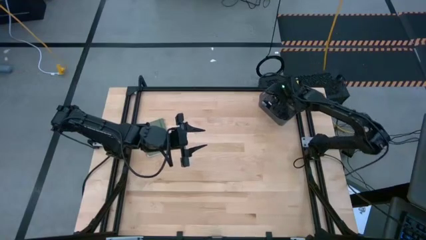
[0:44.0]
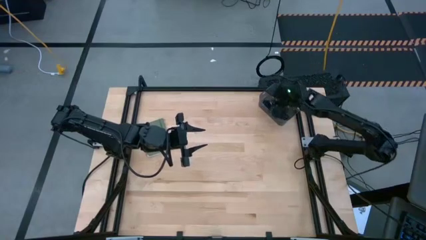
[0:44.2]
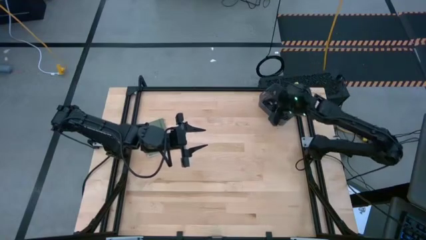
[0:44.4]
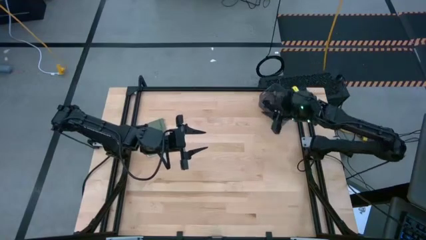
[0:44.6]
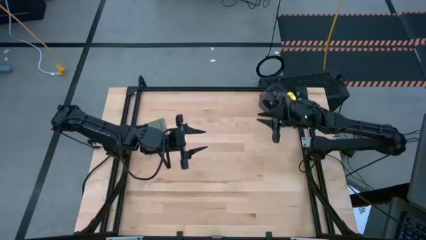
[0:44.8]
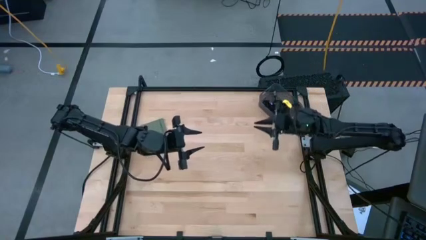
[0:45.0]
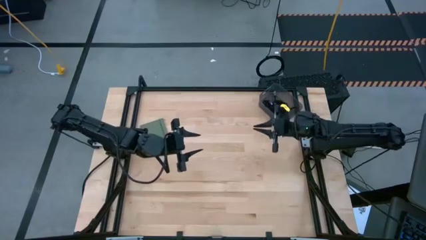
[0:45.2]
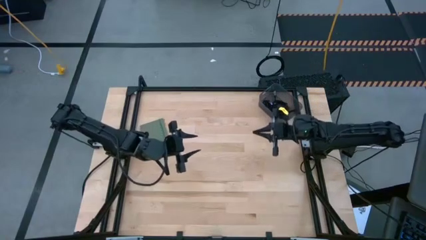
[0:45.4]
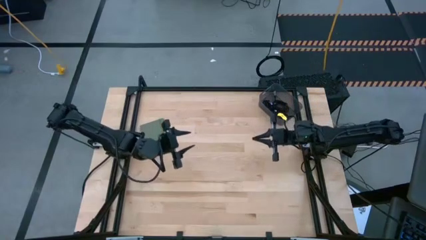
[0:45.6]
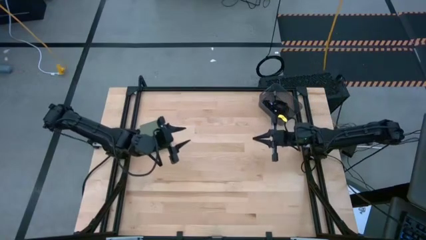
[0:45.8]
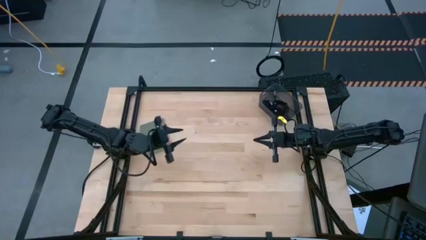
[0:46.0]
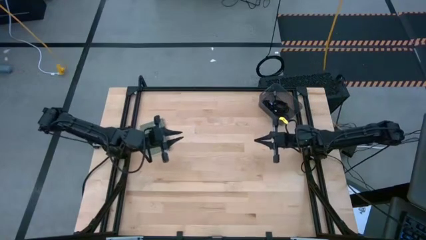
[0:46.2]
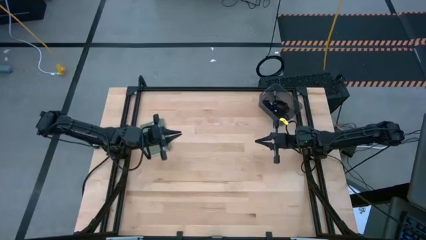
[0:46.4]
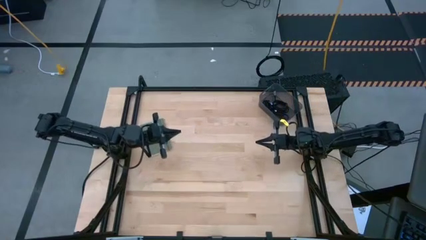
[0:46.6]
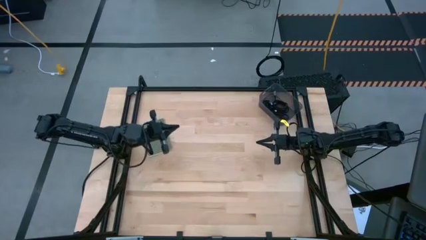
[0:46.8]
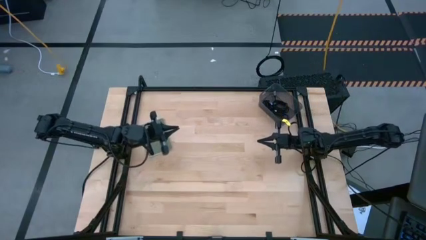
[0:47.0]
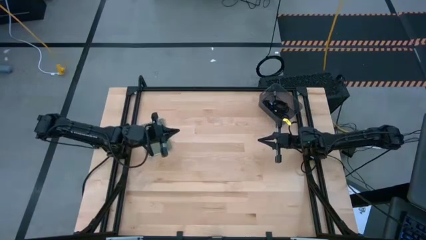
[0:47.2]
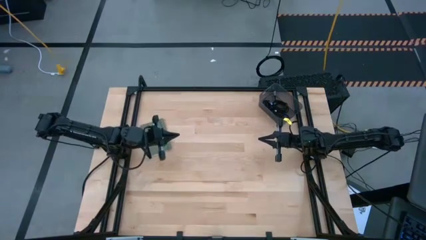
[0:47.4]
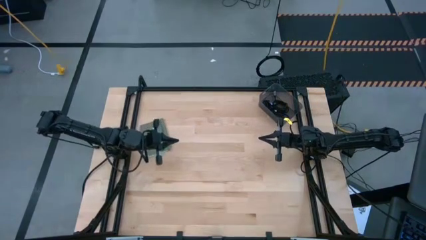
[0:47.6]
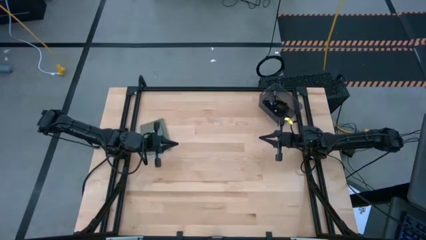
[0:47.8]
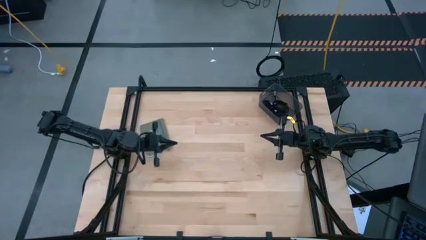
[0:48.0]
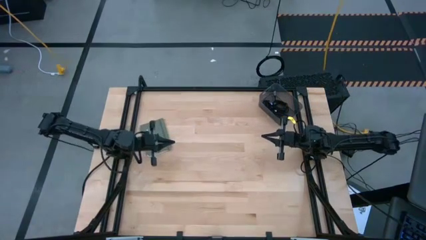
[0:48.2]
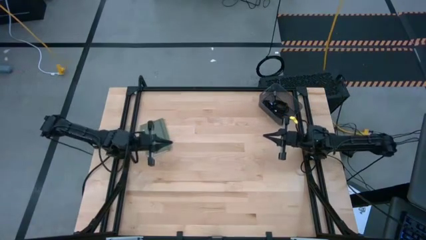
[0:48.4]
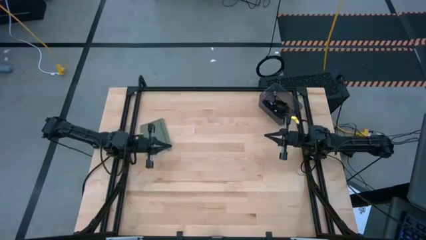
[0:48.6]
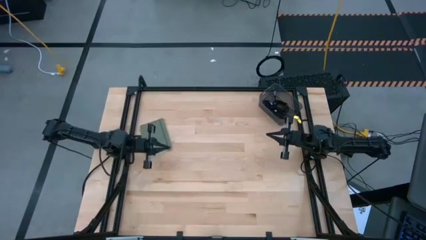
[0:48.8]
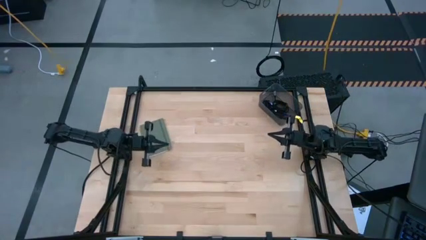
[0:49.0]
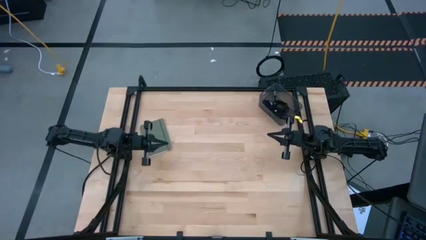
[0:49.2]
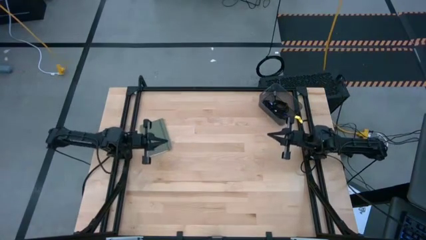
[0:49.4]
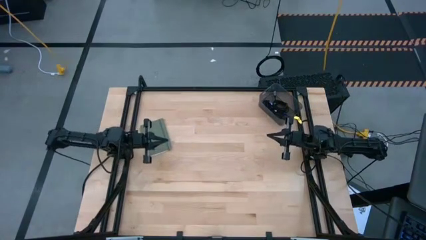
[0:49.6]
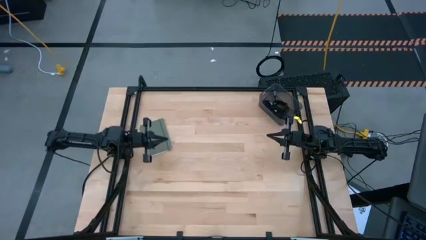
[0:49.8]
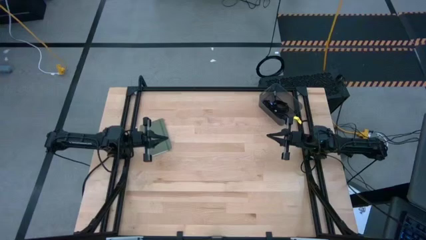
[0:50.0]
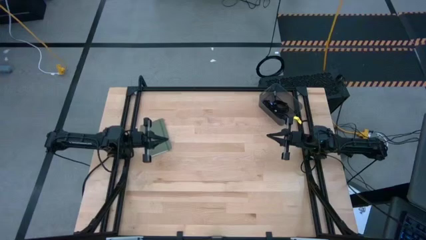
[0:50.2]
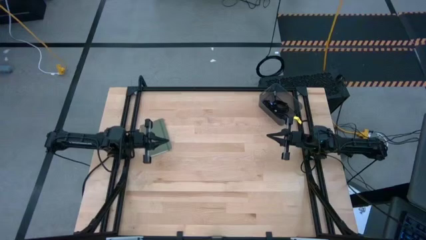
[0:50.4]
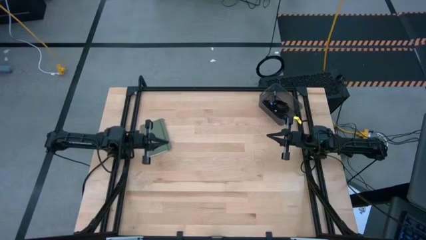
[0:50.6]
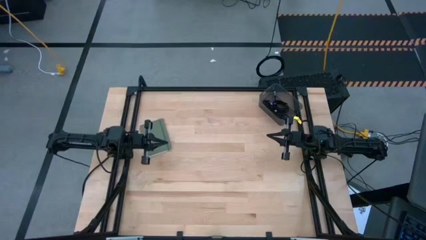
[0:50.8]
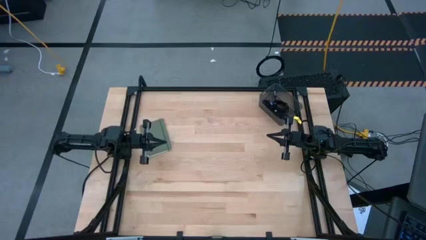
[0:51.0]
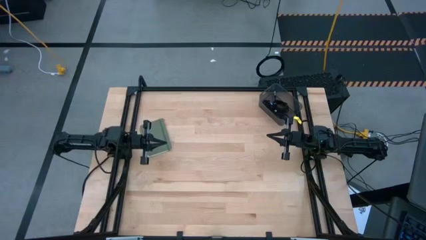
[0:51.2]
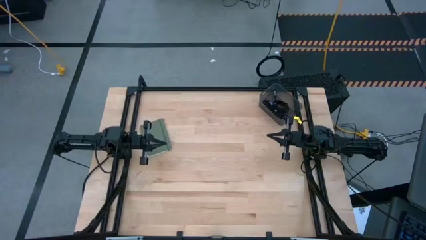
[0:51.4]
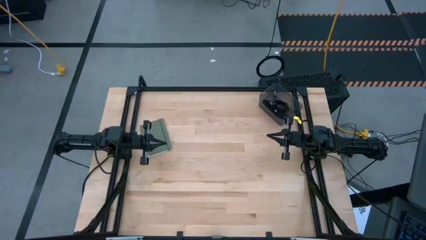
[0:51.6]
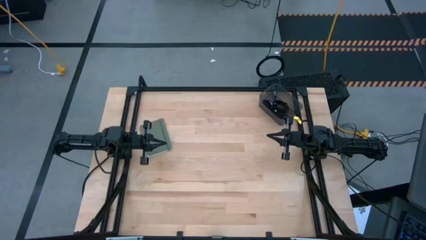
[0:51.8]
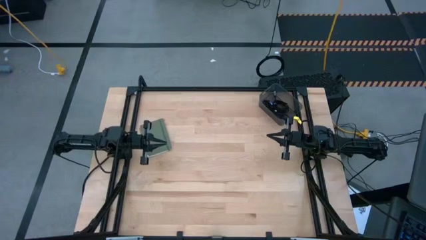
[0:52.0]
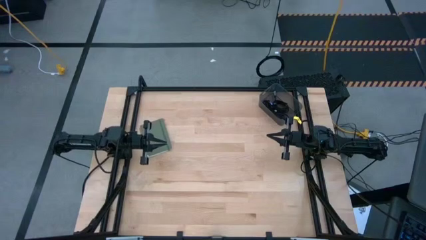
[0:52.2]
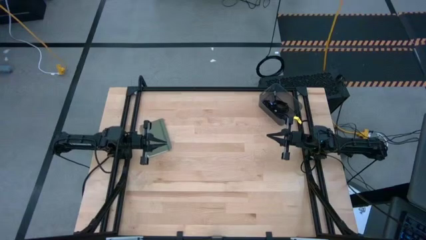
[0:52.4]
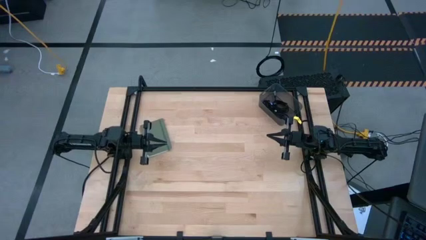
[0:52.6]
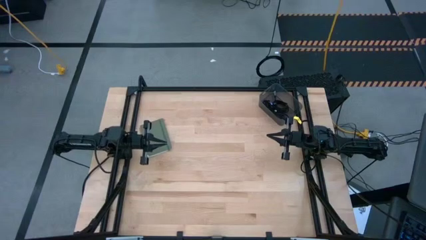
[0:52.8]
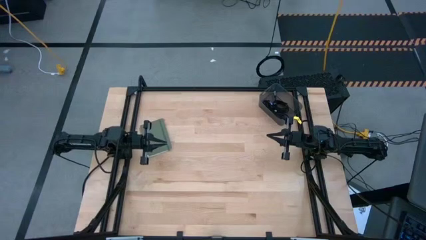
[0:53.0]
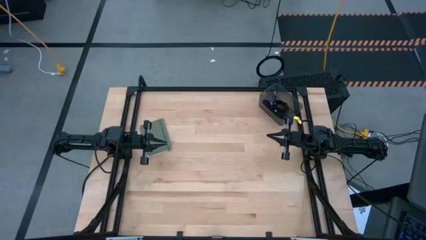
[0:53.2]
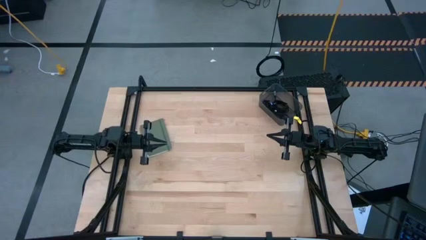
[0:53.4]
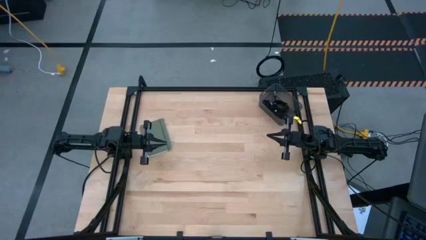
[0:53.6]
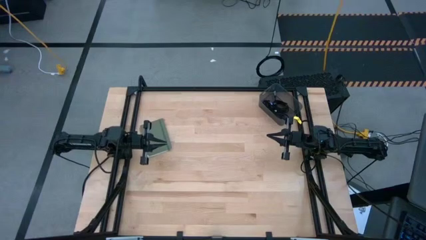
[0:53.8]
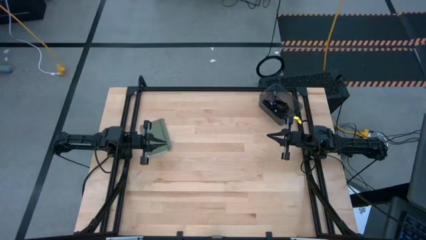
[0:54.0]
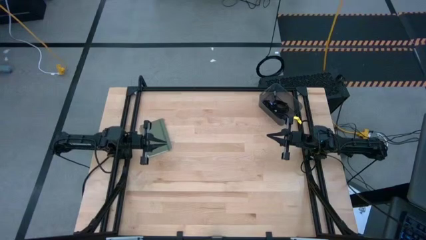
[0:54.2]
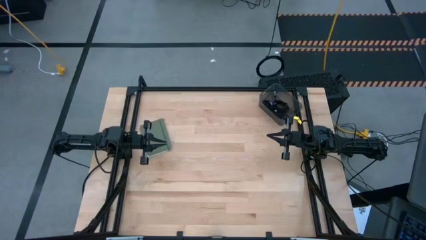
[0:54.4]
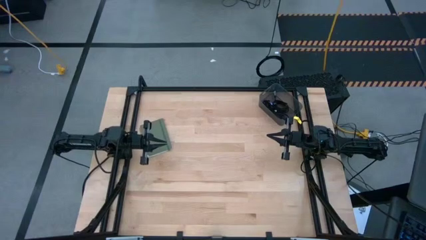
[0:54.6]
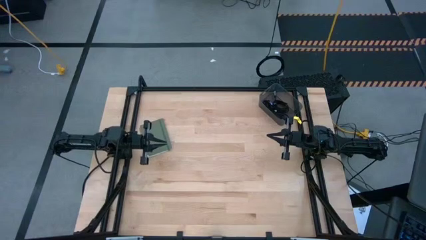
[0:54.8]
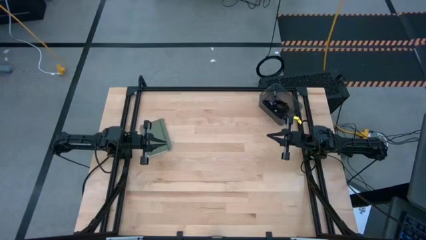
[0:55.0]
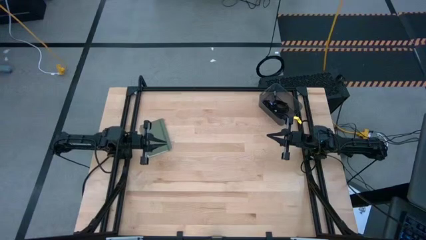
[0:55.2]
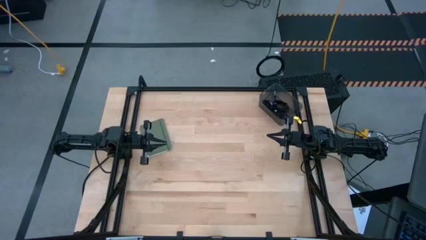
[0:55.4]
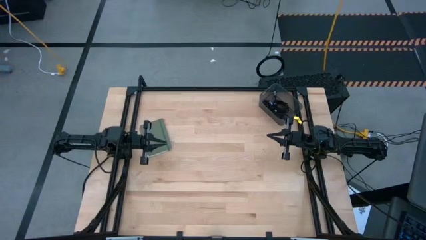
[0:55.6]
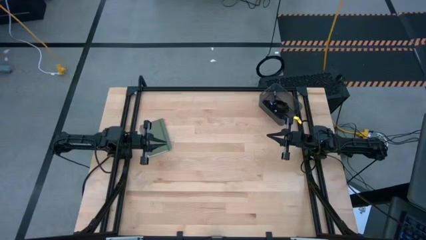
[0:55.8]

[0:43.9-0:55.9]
Task: Pick and place USB-C Cables
Return to Home Position
